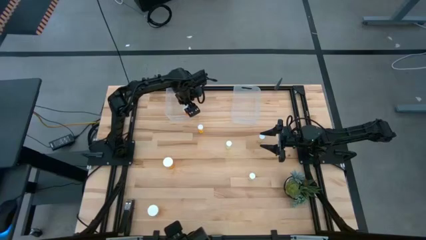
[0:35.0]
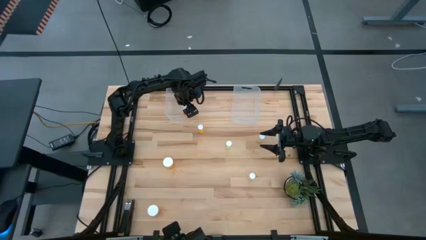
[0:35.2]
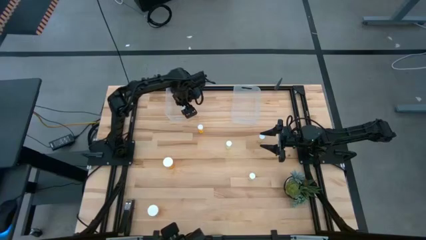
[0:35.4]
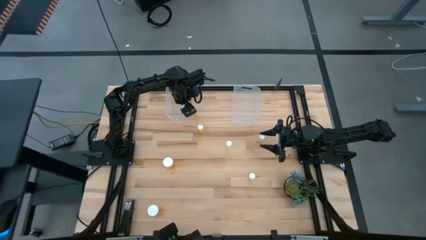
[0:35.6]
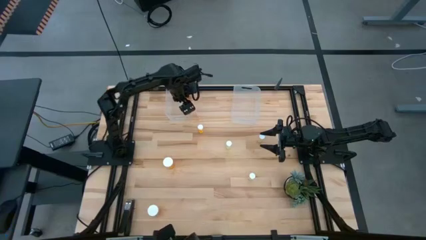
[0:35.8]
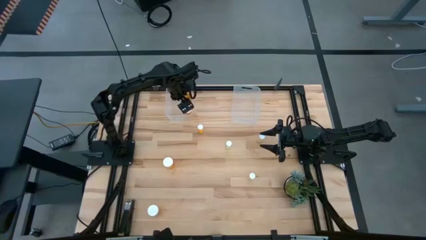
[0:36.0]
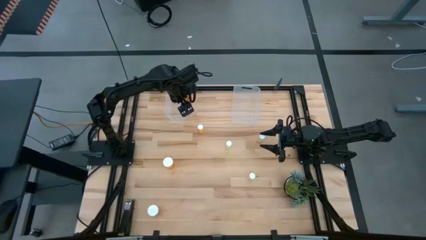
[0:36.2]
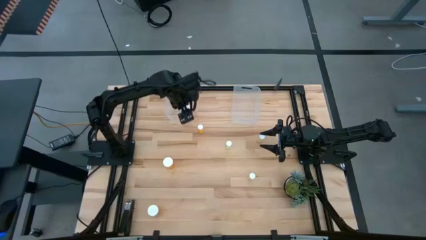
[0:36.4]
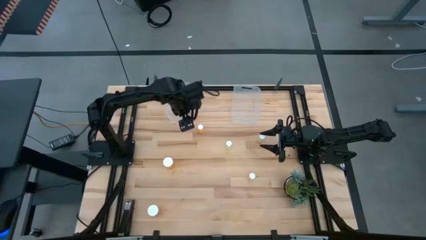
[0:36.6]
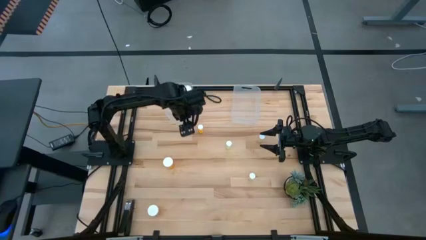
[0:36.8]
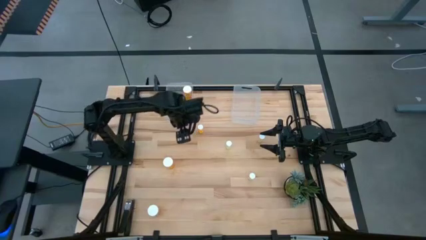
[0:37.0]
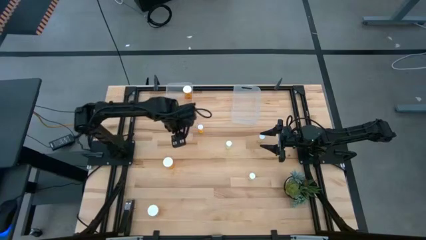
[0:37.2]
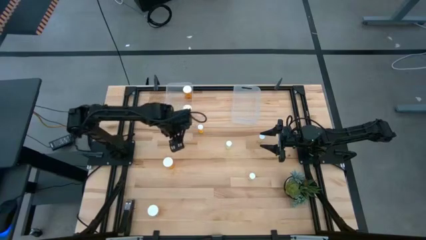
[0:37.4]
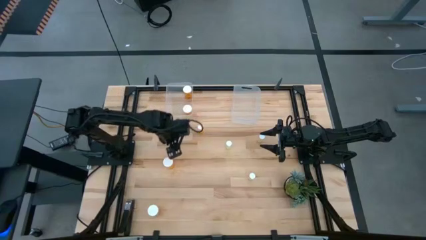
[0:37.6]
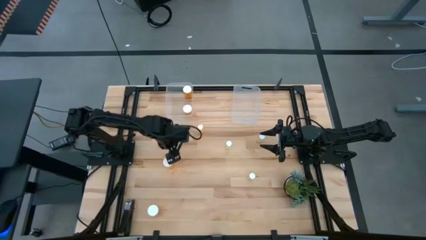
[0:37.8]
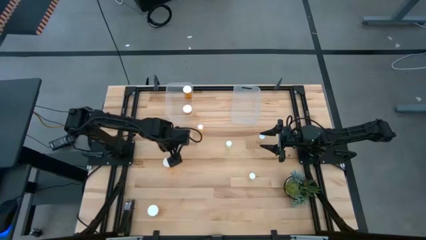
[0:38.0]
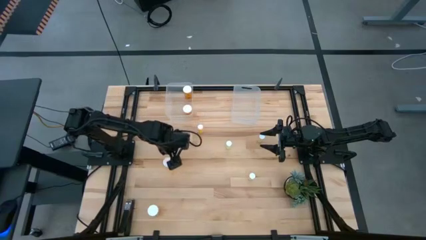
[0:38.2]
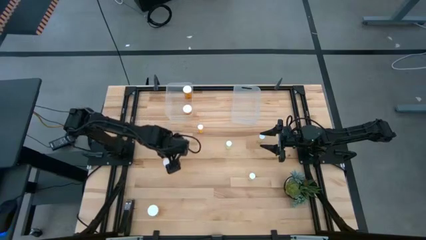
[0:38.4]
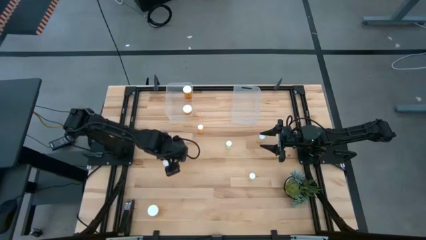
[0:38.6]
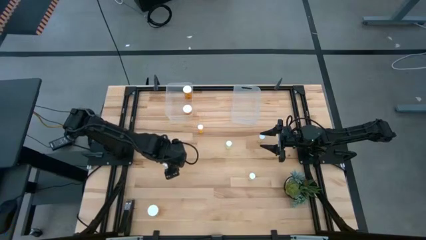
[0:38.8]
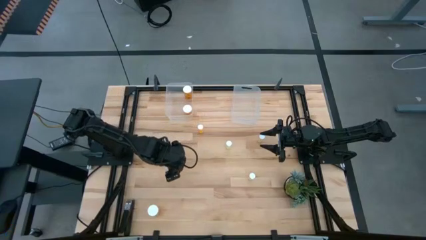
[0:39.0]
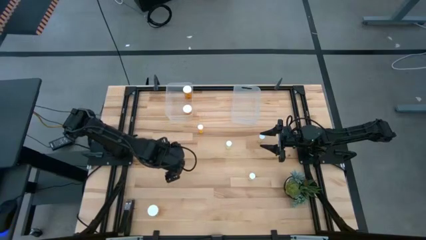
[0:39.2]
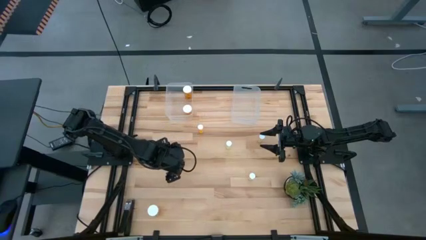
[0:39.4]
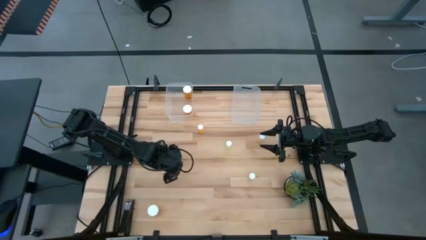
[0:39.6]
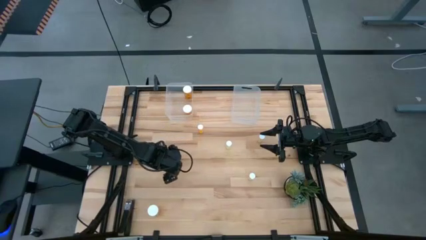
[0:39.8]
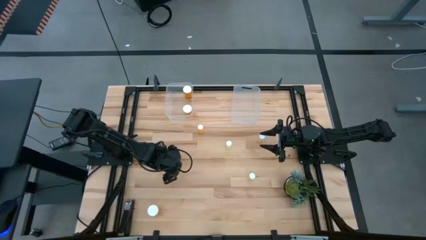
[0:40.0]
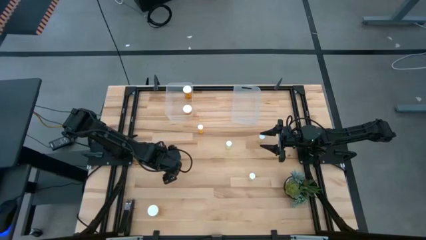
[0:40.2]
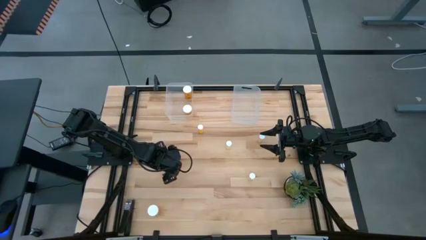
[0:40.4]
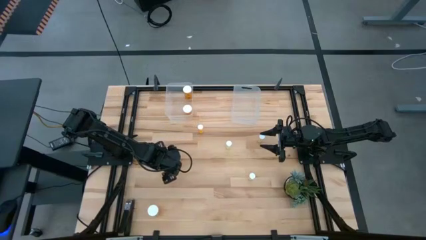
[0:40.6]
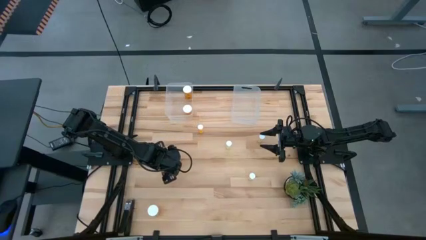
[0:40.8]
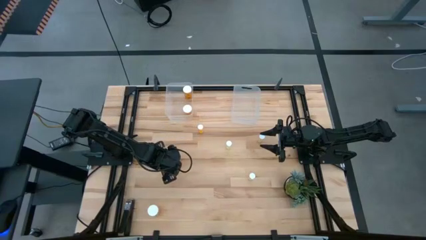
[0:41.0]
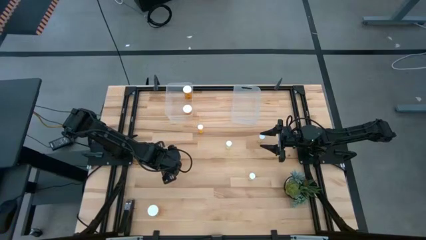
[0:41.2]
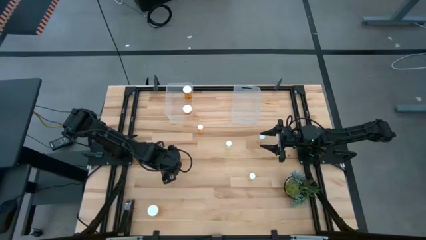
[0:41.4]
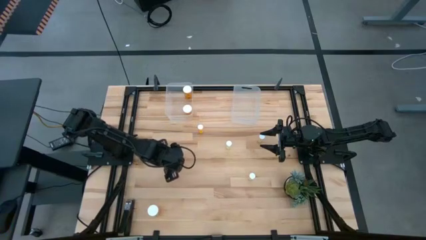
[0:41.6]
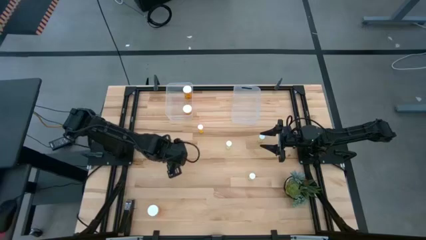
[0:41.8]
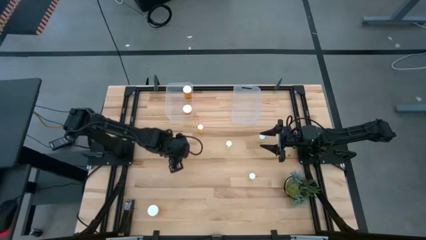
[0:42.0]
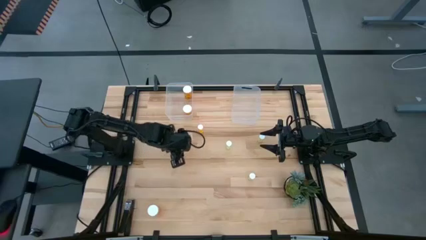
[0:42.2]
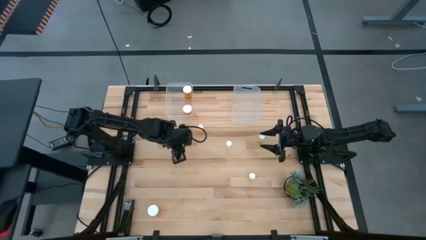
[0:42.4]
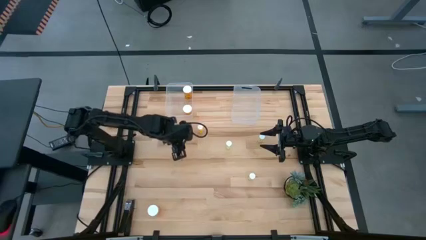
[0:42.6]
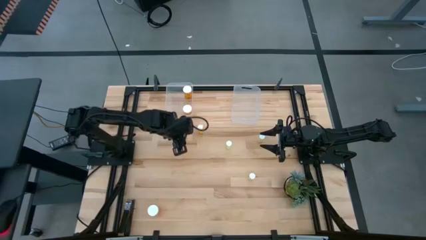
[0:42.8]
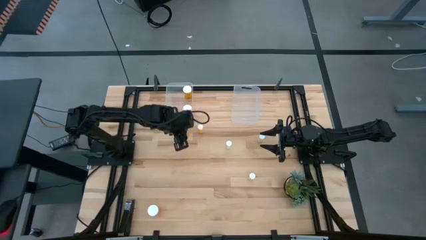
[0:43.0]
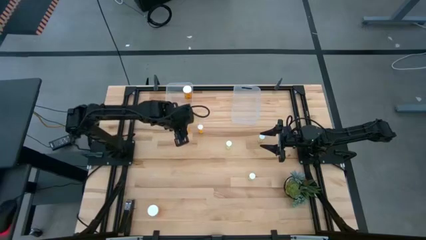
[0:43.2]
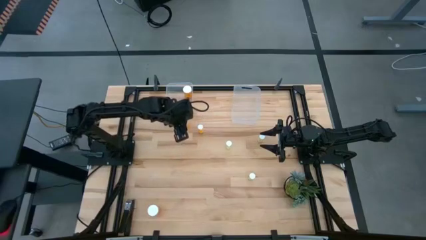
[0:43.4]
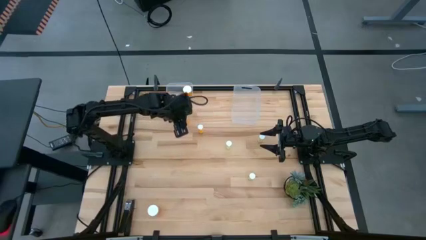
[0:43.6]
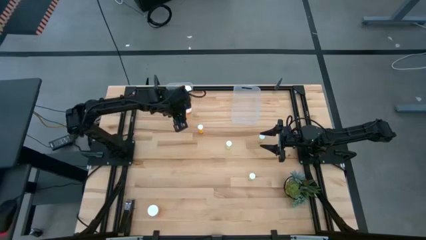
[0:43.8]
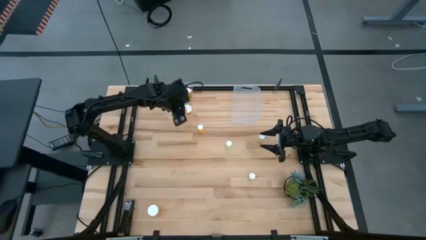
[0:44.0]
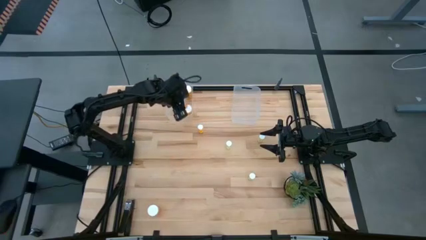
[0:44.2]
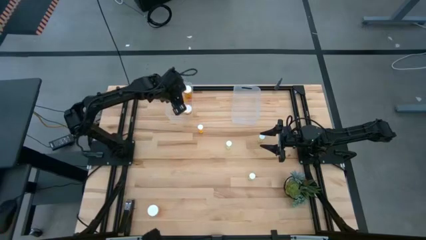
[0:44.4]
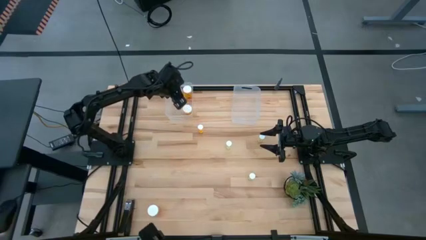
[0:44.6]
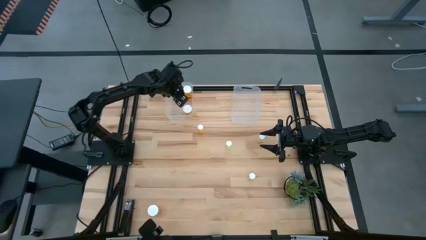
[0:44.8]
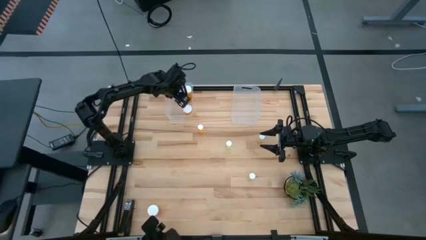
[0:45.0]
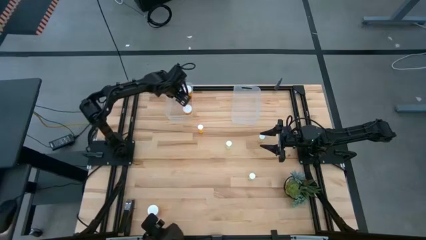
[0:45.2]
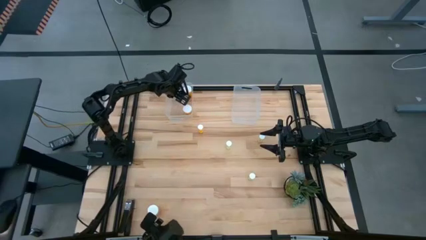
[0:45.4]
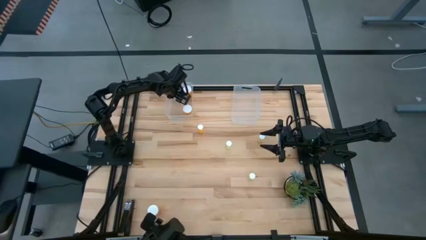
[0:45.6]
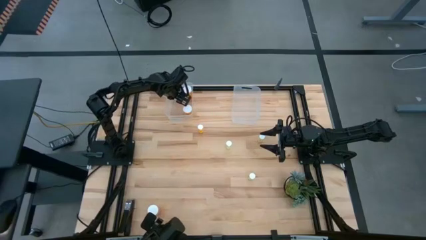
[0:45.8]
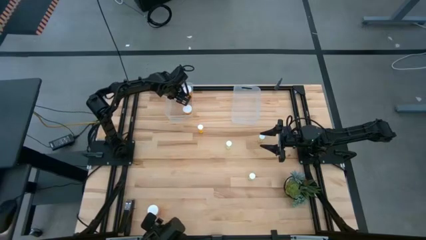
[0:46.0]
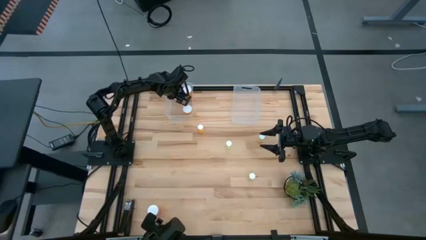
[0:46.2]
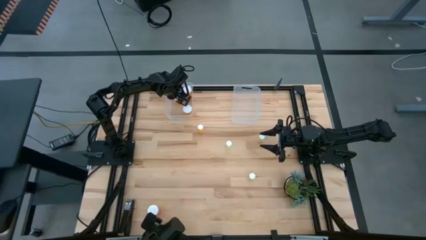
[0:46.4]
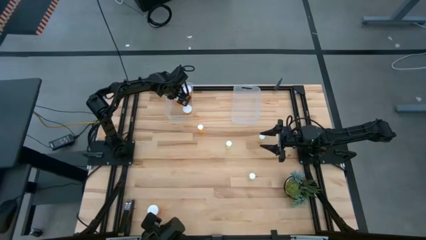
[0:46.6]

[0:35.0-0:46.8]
Task: Pick and place medicine bottles into bin by pill shape (circle, oval)
Put the large orange pill bottle into the left transparent bin

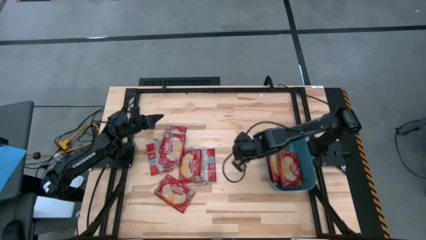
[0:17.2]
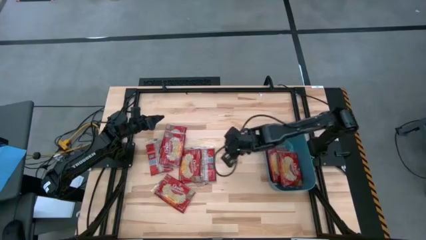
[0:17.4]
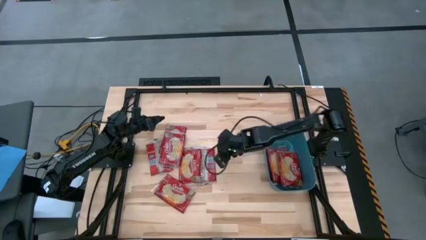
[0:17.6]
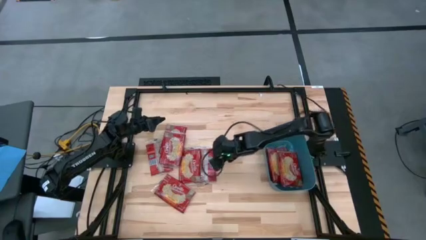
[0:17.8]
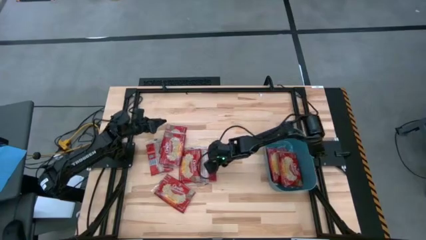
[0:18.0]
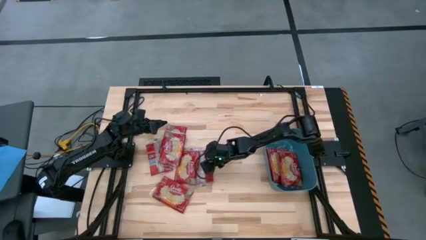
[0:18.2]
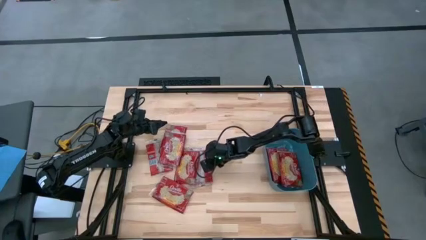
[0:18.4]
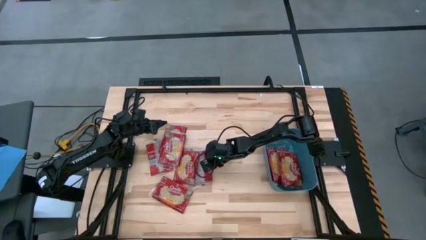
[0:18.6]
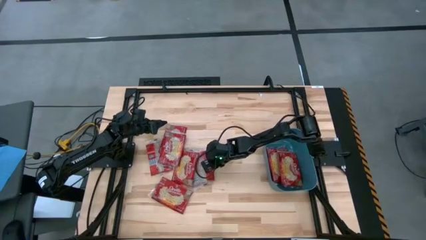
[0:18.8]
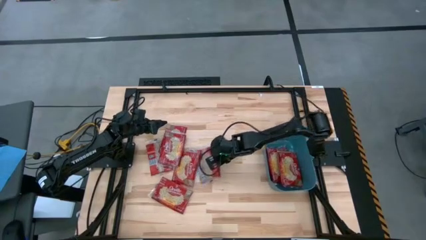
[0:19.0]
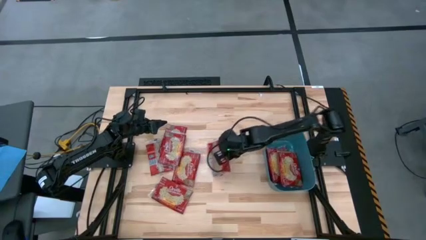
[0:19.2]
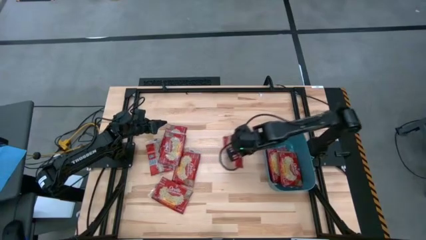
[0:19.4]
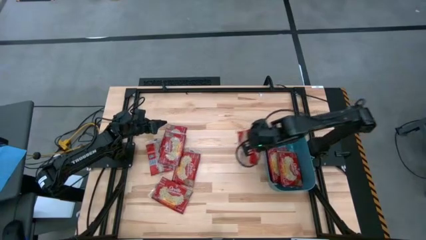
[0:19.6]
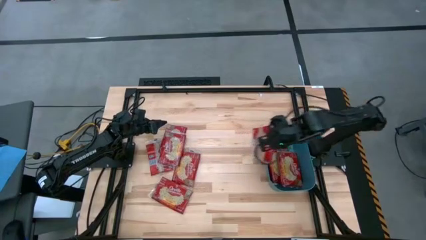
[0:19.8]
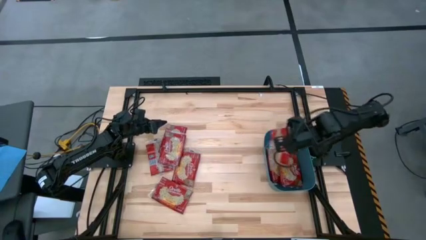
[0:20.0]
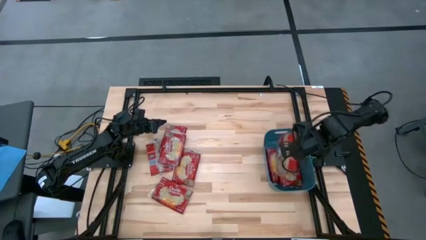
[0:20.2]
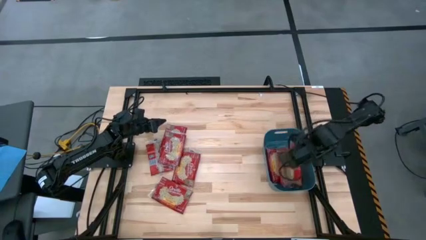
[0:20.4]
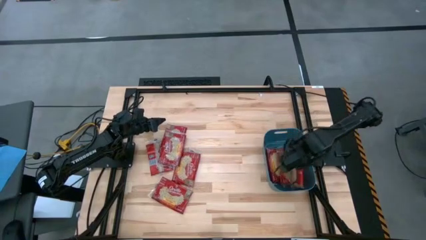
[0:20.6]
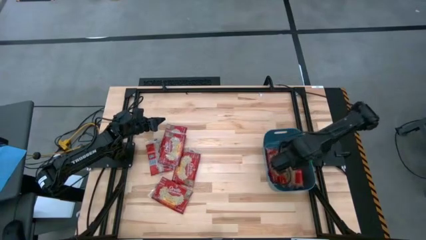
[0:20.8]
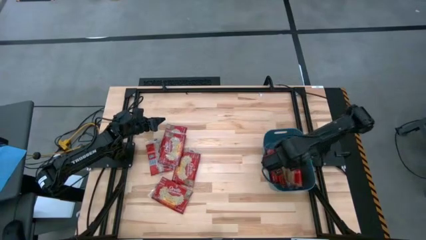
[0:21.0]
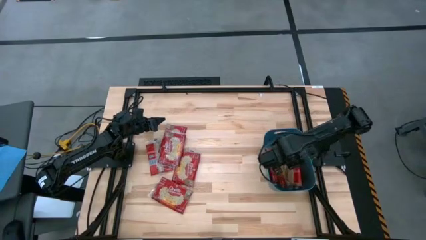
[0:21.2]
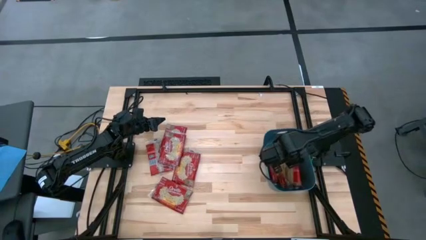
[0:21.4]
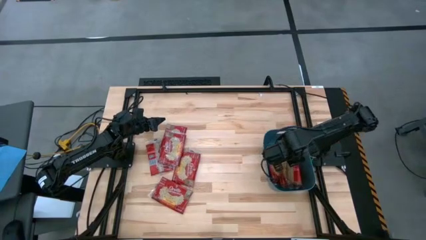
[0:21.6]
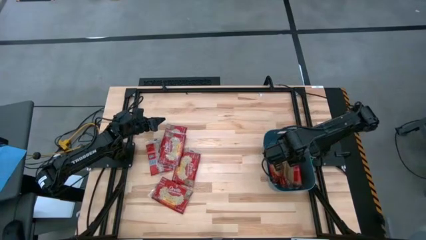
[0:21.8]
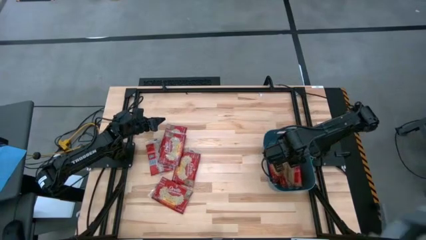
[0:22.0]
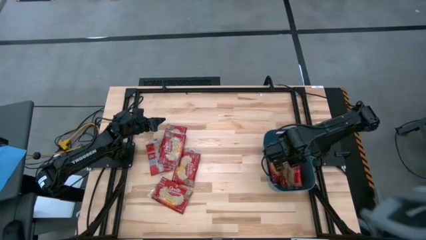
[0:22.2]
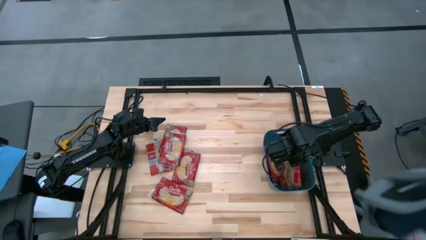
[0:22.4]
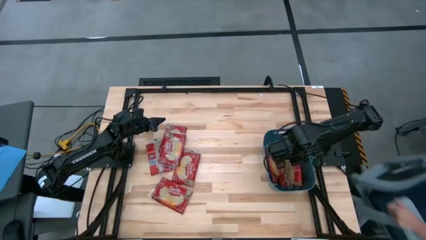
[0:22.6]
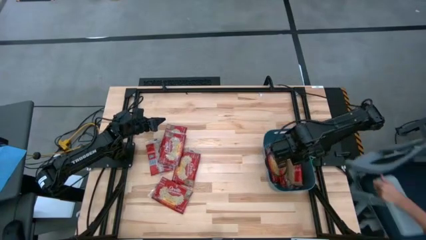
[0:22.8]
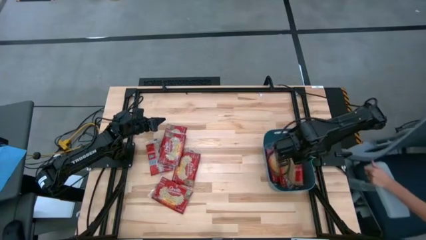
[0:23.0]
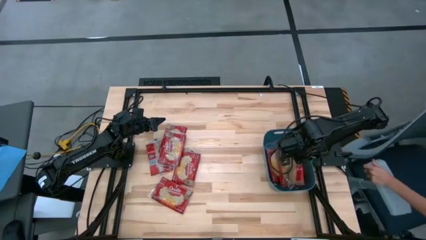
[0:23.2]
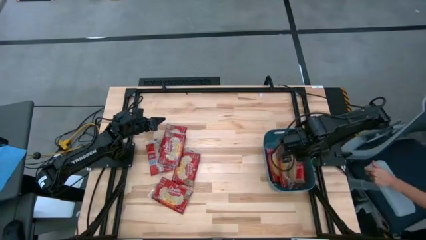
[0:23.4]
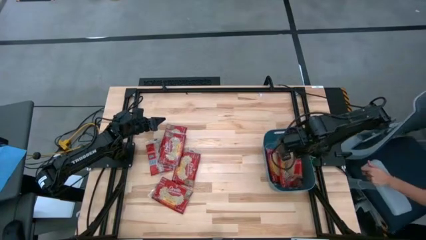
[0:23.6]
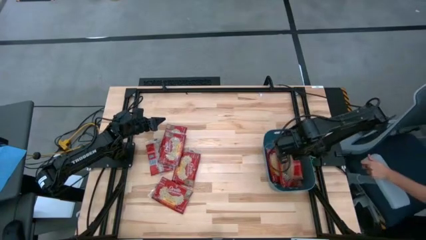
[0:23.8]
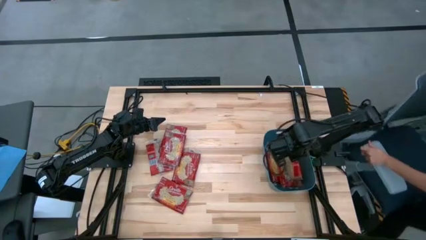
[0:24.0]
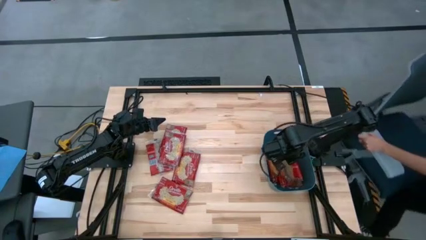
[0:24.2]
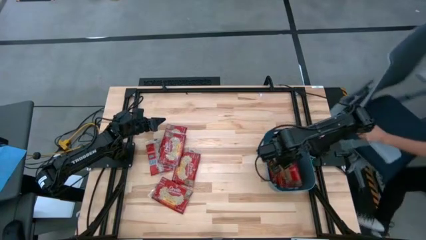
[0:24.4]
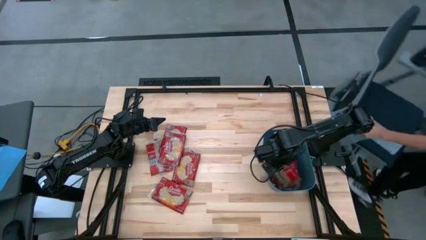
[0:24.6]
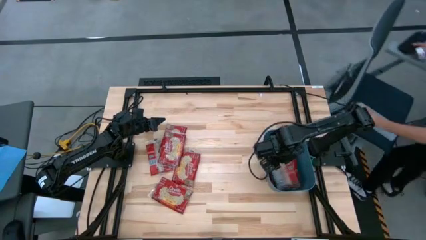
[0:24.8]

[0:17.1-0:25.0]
Task: Sort popcorn bags into baskets
Stack the popcorn bag into the blue bin
